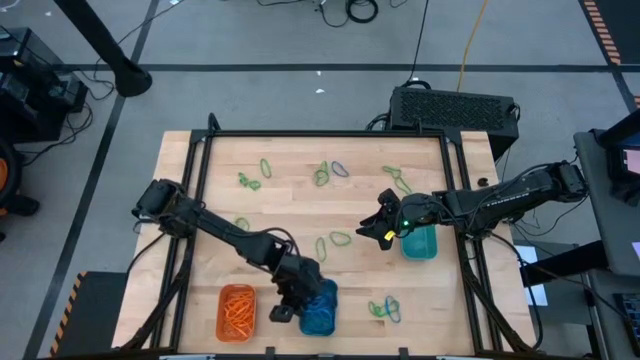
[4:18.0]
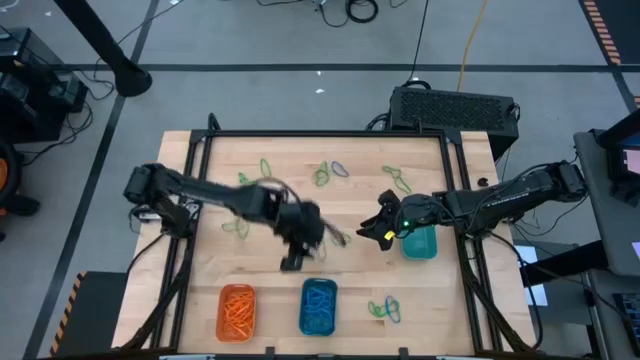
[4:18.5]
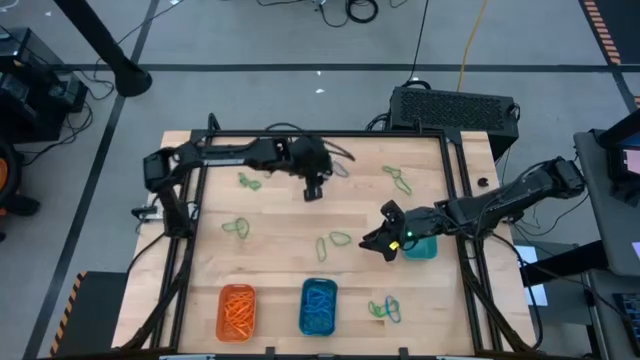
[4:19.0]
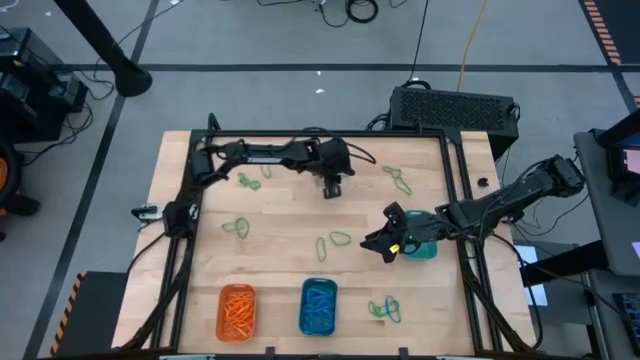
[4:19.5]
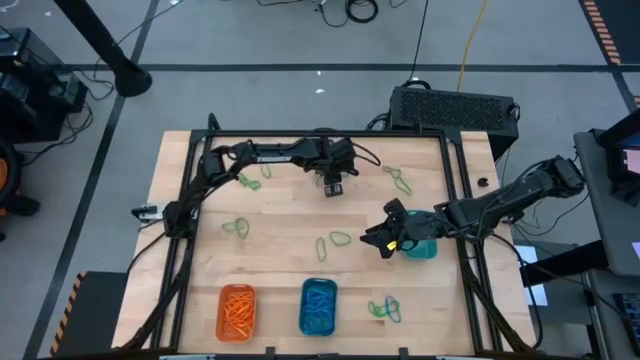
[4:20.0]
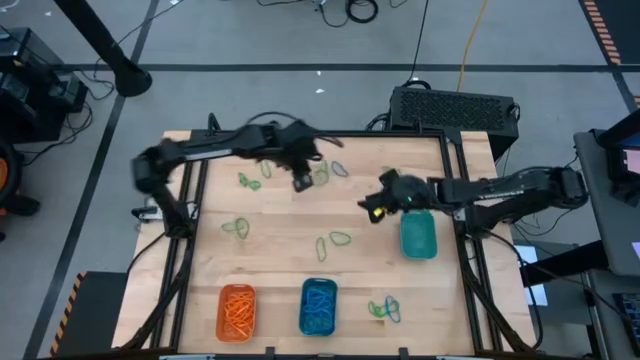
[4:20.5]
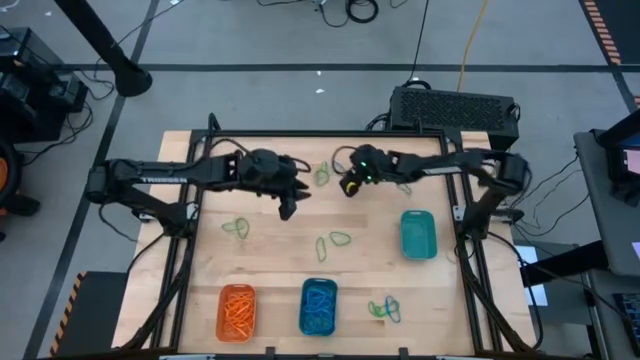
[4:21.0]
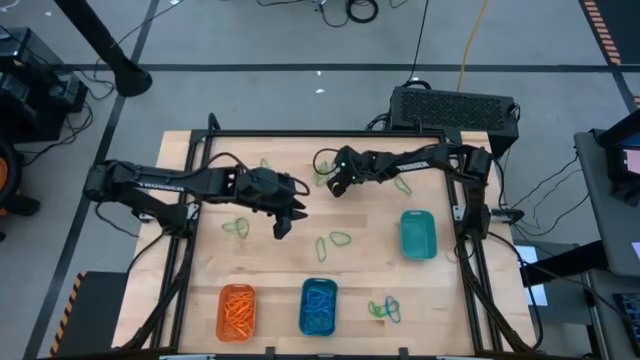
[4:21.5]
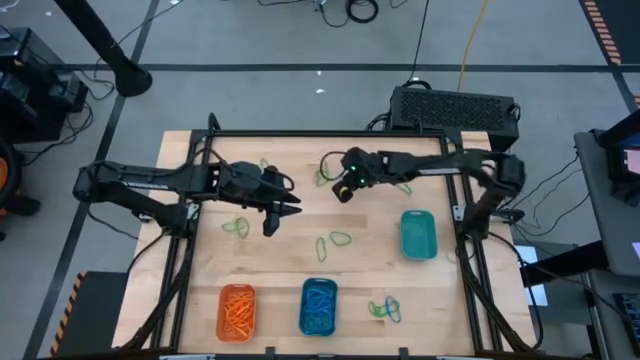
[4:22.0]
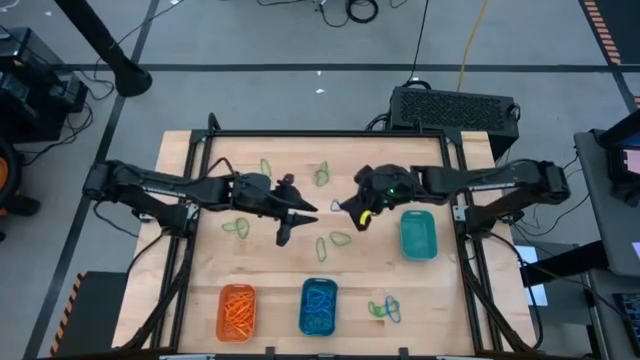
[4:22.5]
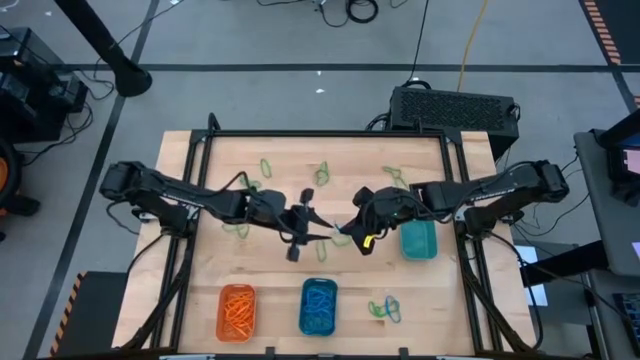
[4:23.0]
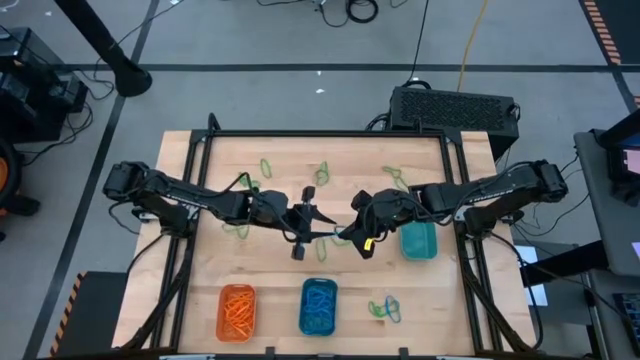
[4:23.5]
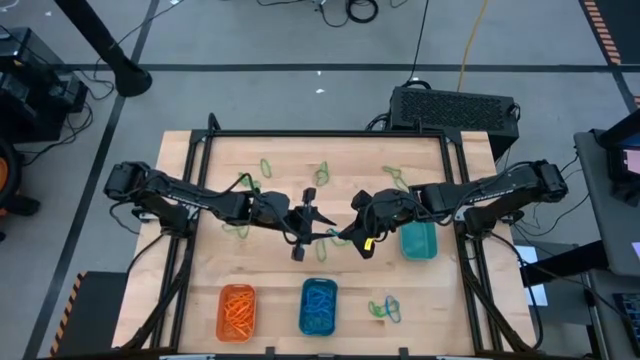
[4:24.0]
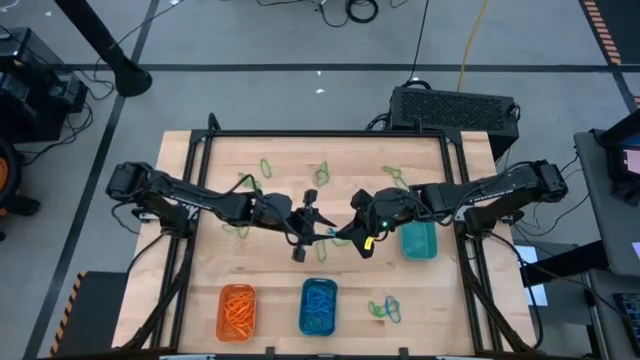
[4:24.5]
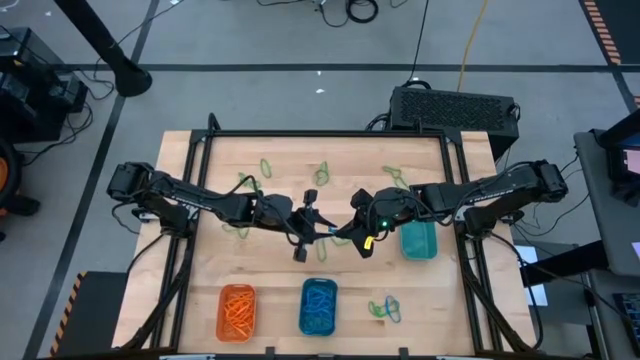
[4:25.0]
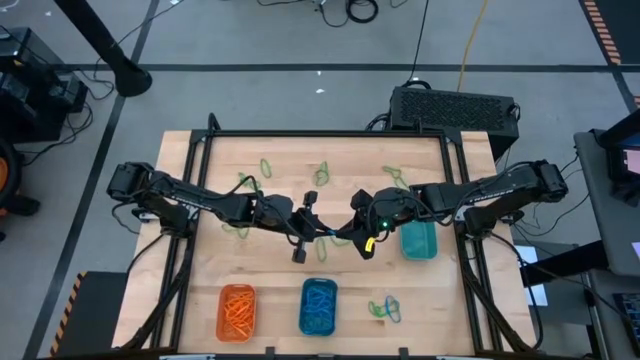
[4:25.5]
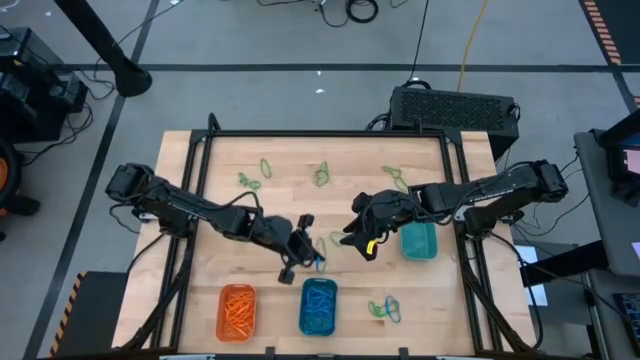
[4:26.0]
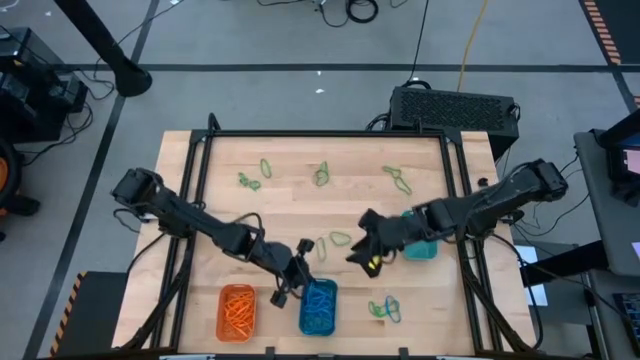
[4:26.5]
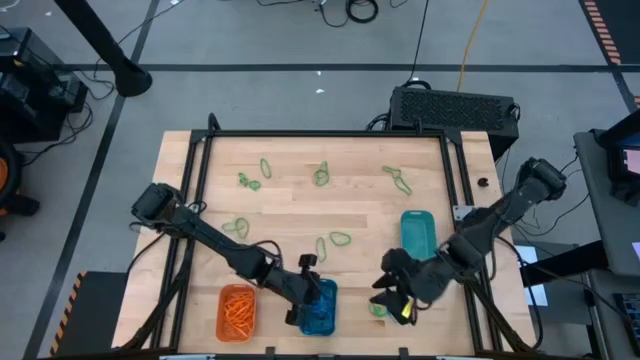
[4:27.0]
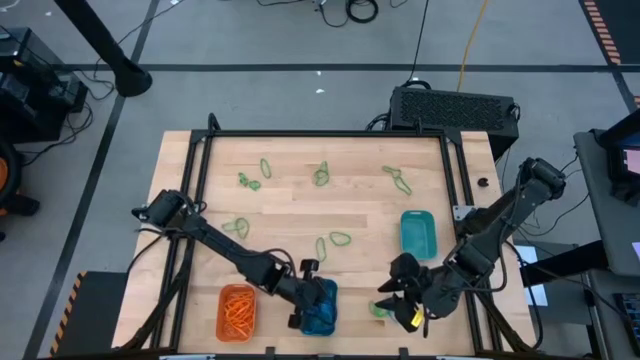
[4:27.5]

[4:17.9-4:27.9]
Task: Sort rubber bands into baskets
Put the blue rubber band into the blue bin

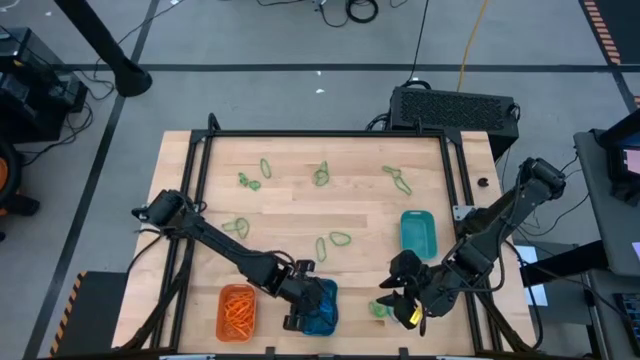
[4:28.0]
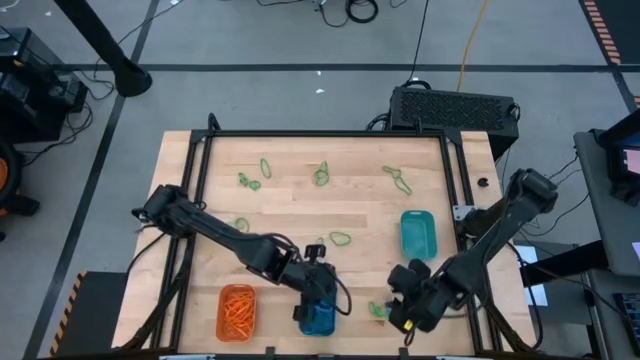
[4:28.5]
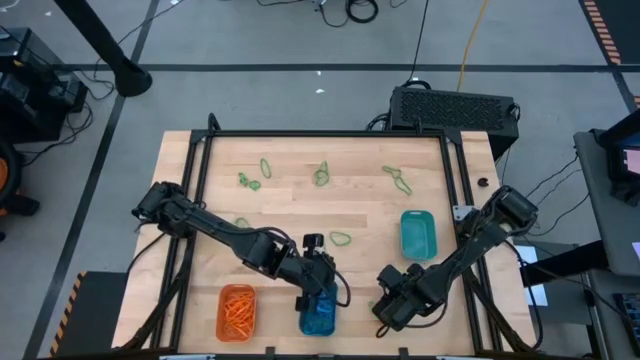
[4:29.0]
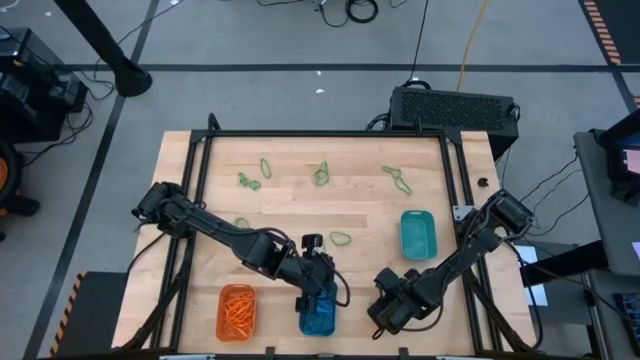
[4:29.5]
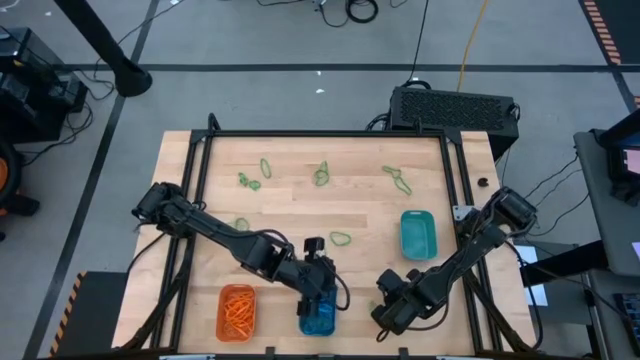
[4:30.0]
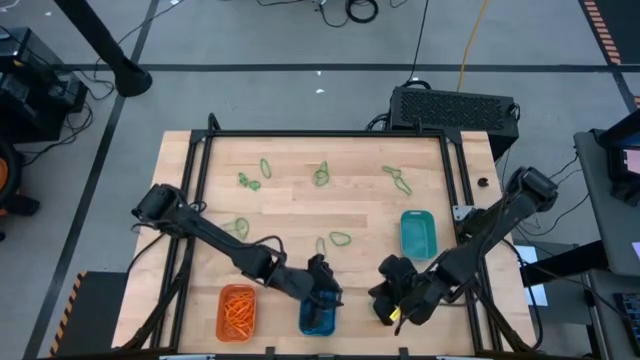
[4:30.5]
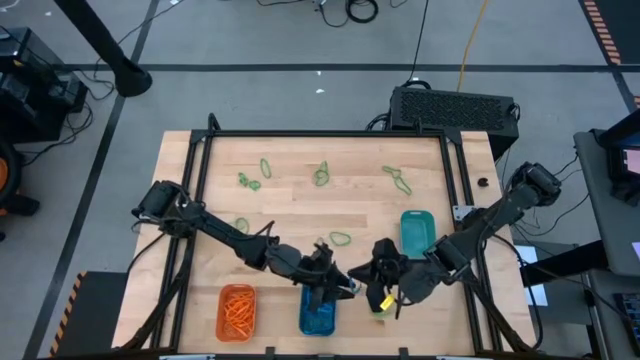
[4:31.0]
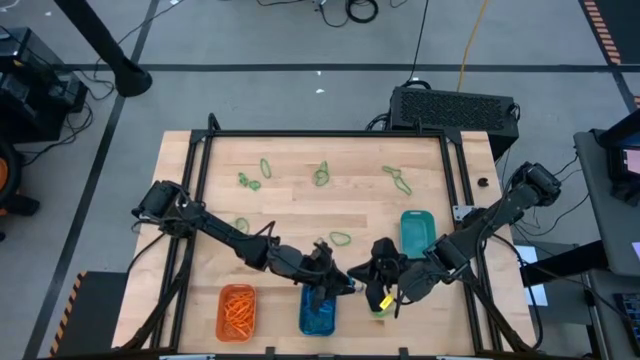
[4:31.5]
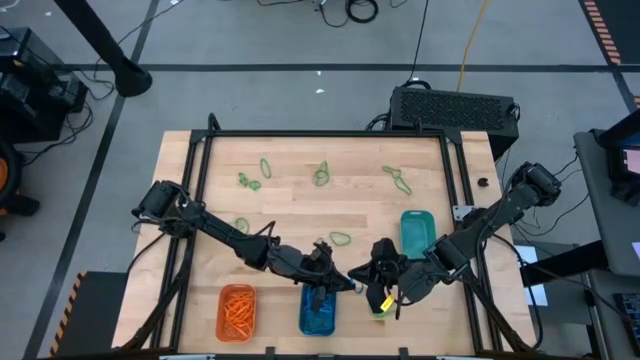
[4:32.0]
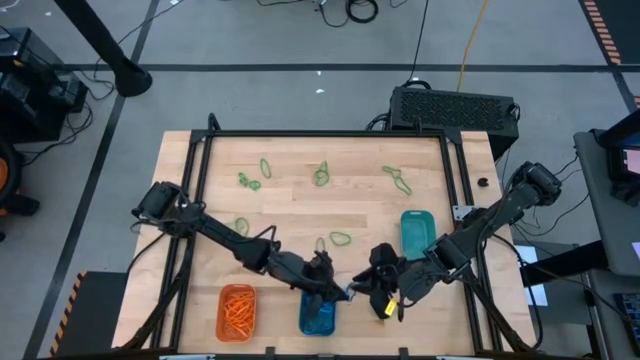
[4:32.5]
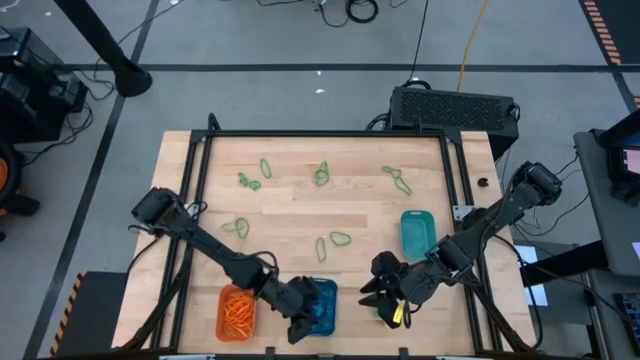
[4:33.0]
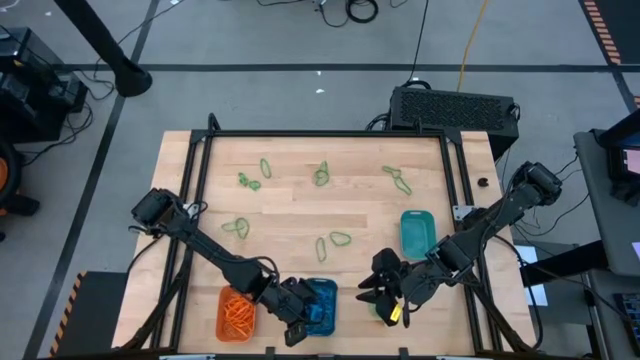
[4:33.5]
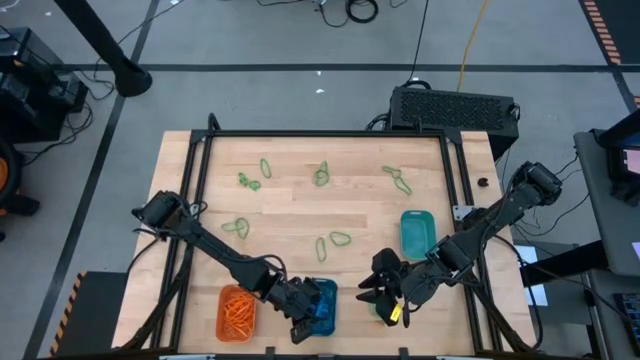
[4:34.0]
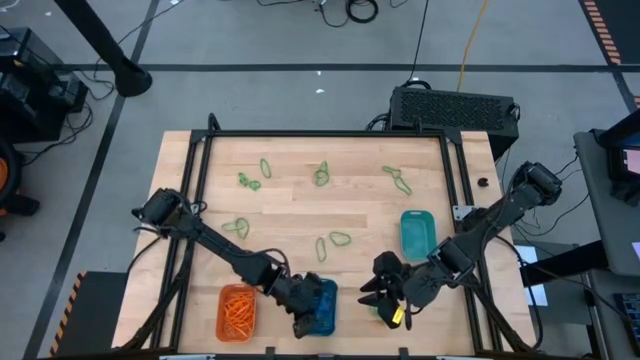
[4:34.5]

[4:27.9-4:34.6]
Put the blue rubber band into the blue bin

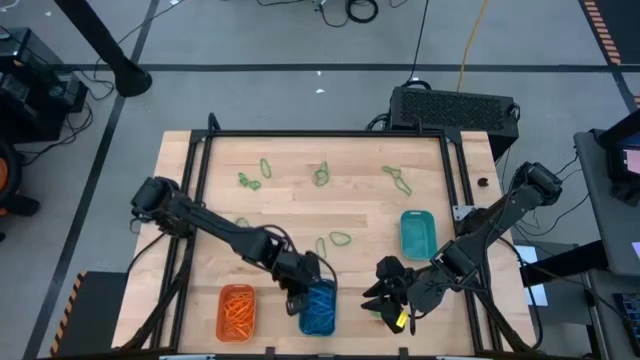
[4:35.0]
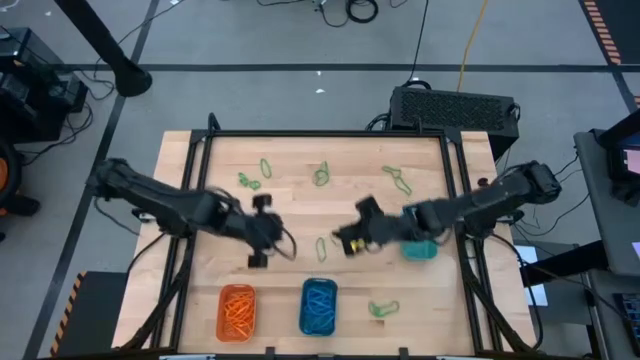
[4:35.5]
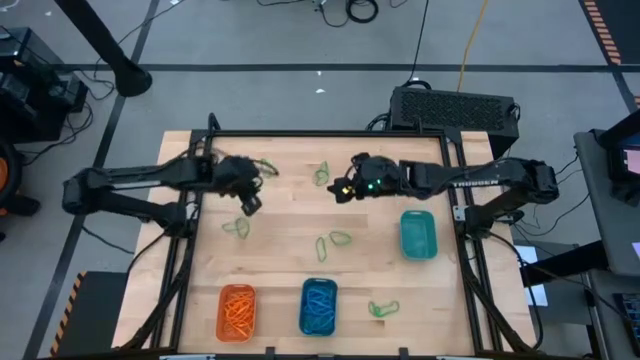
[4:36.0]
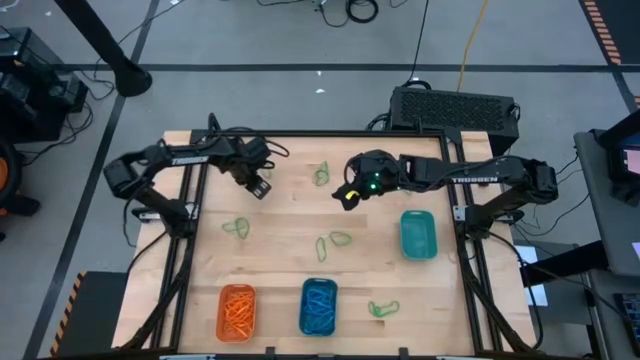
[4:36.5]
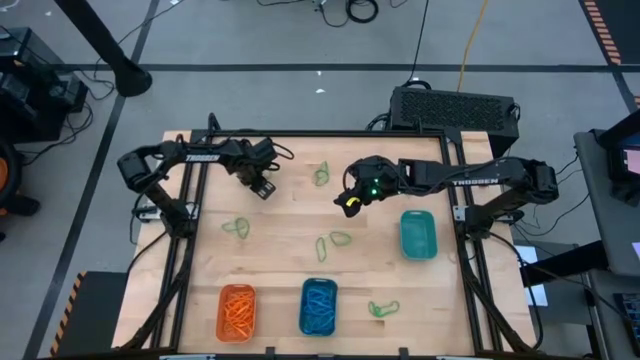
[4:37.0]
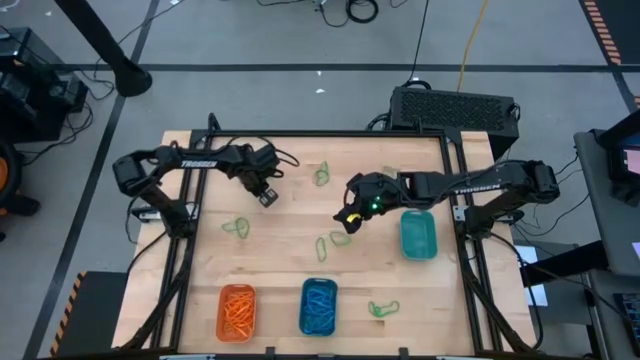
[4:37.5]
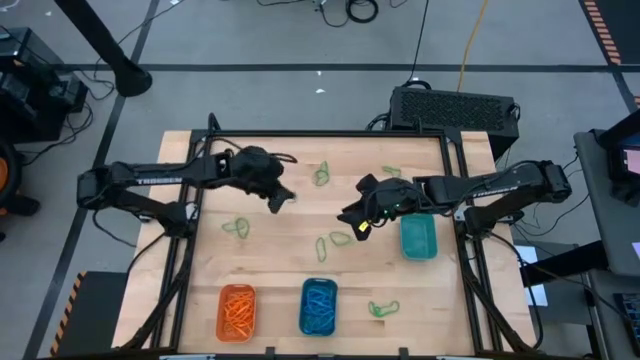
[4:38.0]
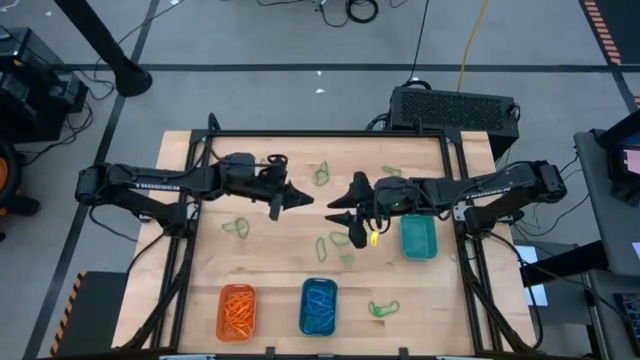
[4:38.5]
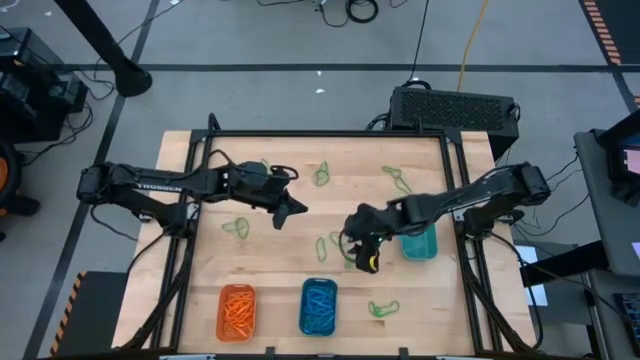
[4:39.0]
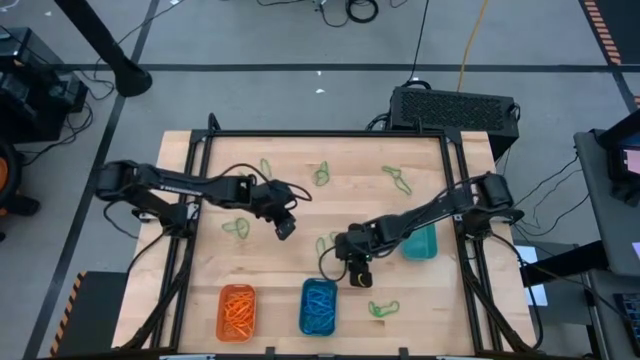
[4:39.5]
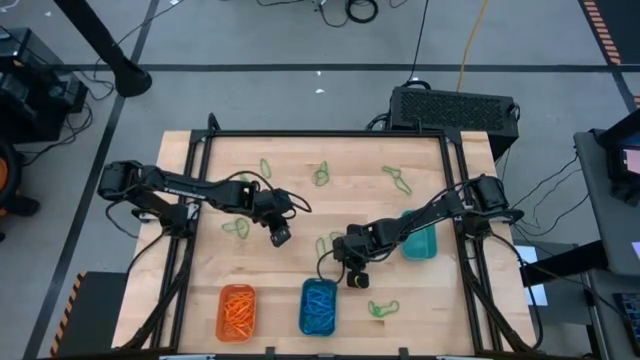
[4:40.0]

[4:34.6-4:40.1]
Put the green rubber band into the green bin

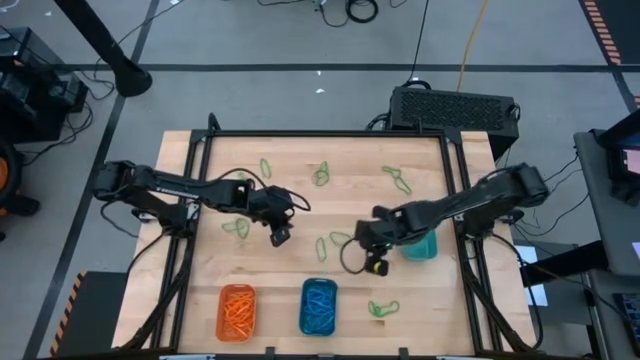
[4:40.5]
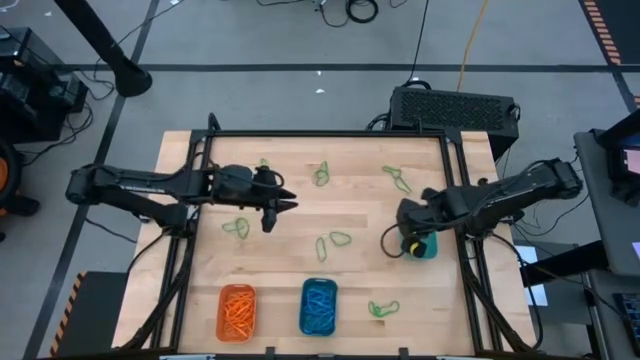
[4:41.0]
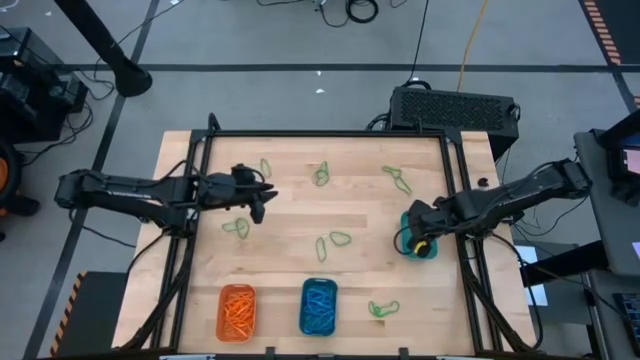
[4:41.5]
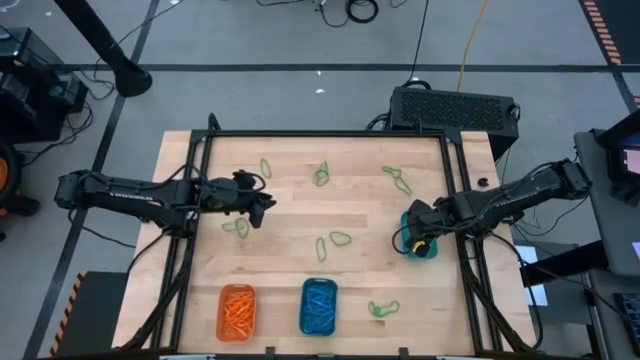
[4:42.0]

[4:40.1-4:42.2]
Put the green rubber band into the green bin
